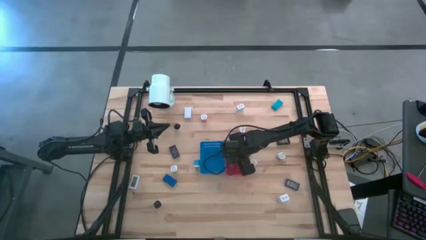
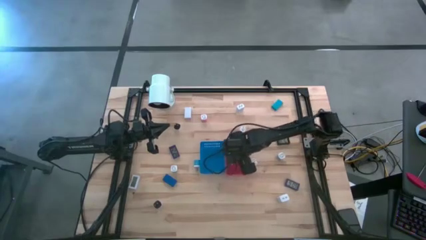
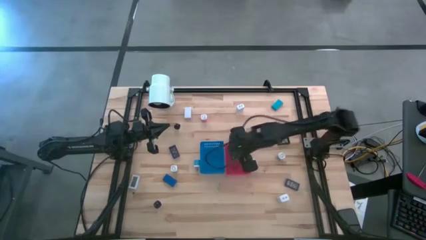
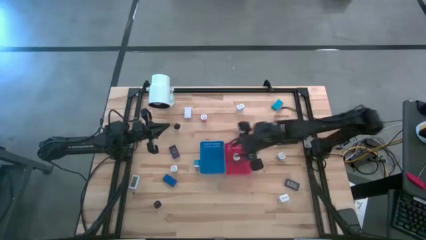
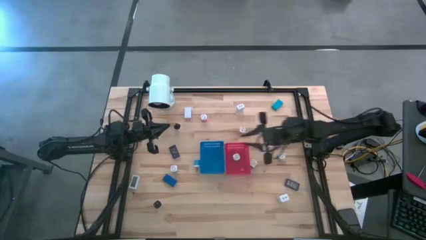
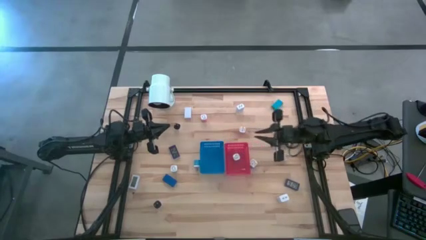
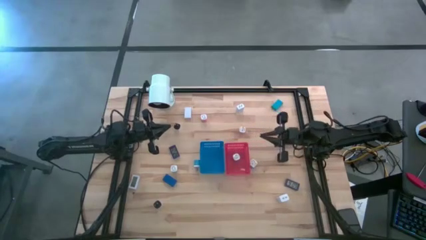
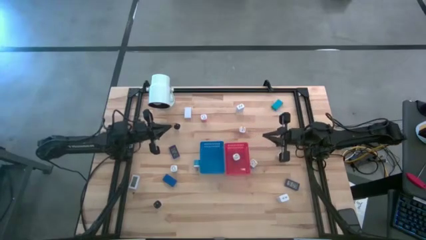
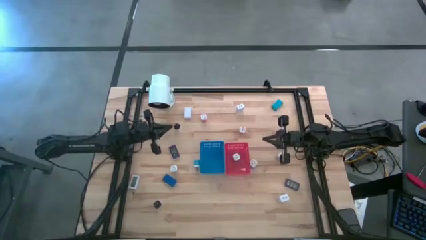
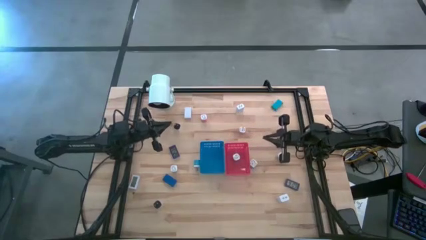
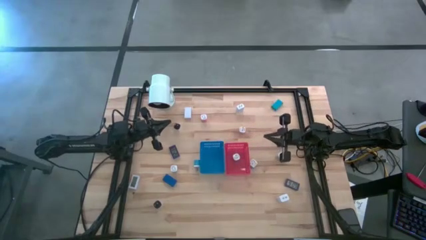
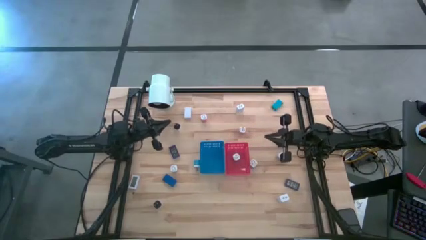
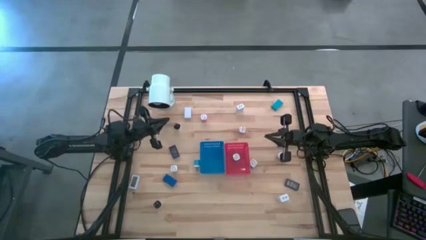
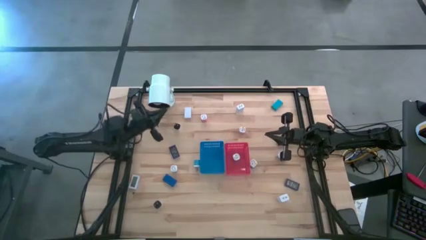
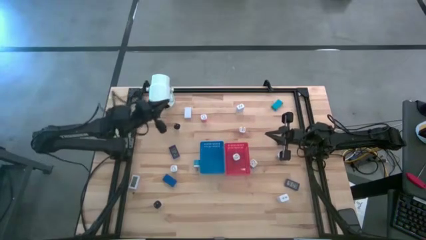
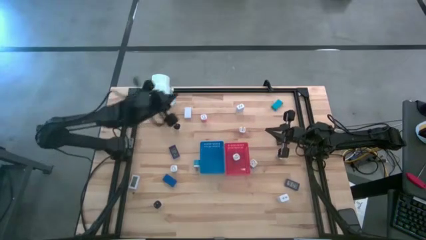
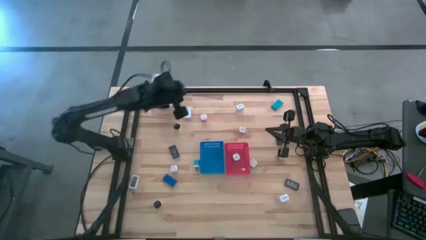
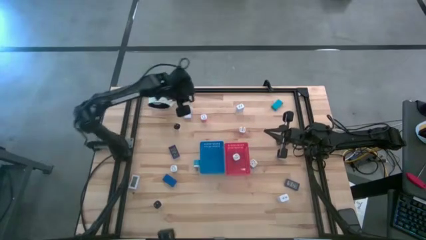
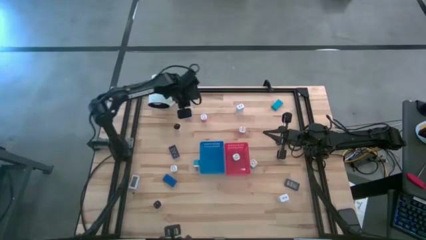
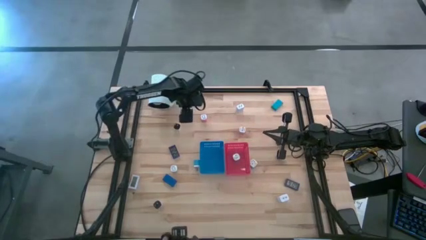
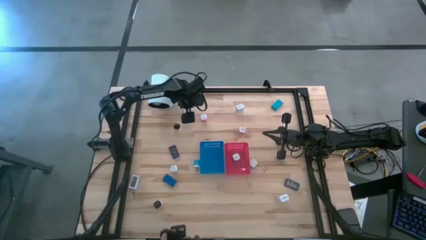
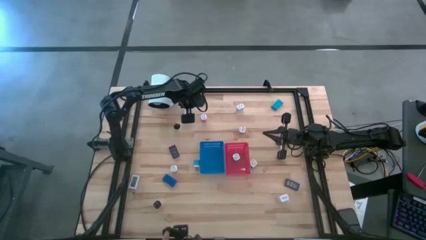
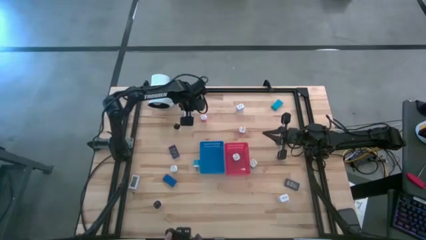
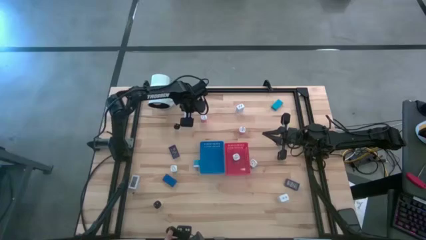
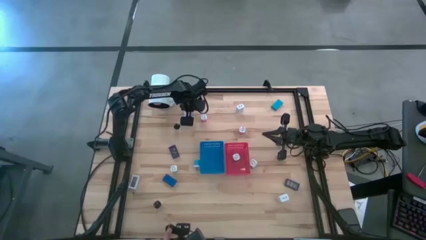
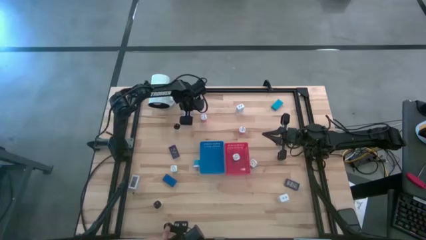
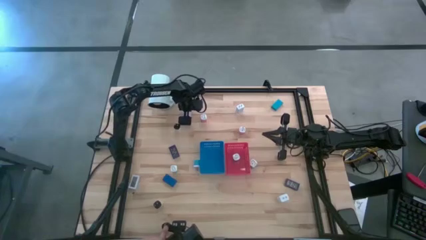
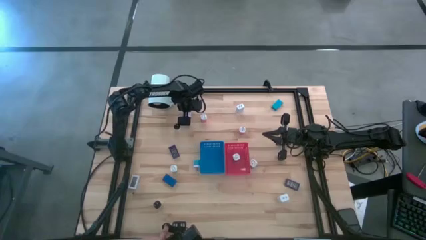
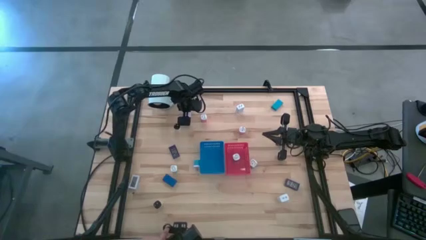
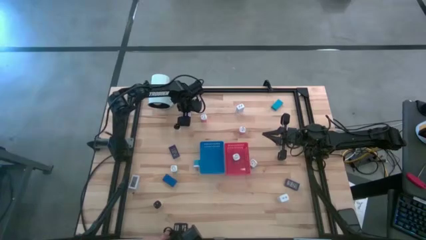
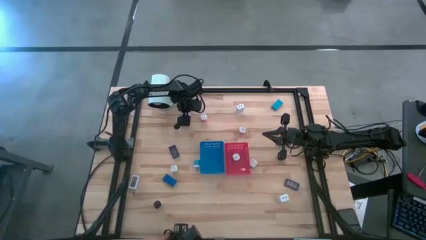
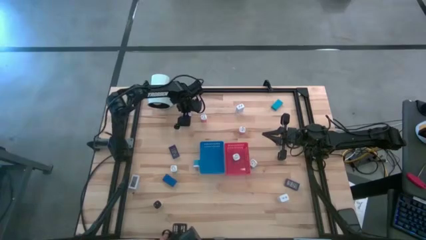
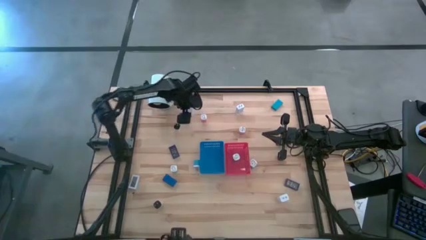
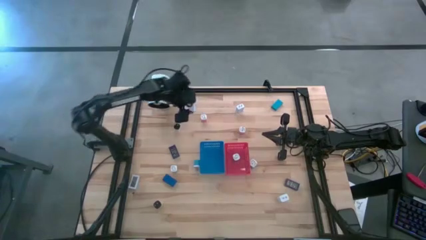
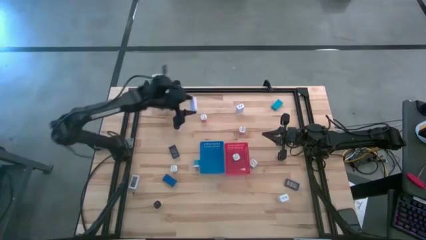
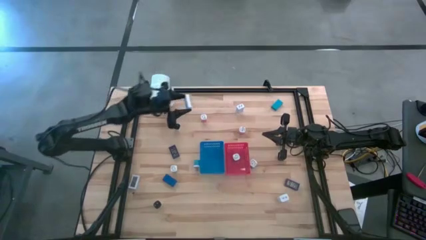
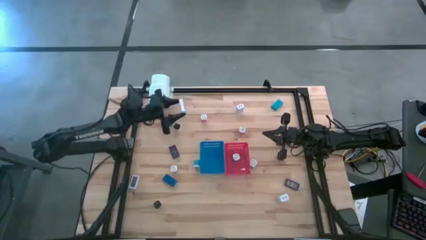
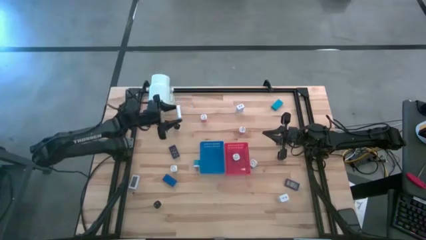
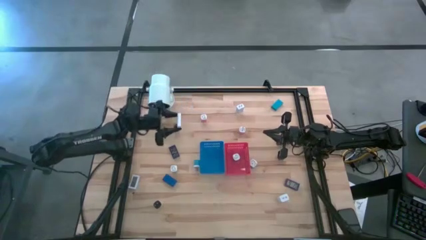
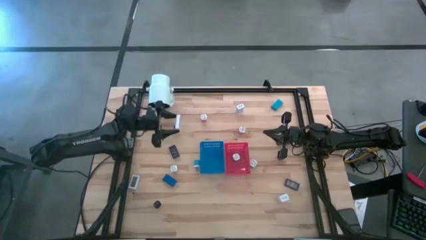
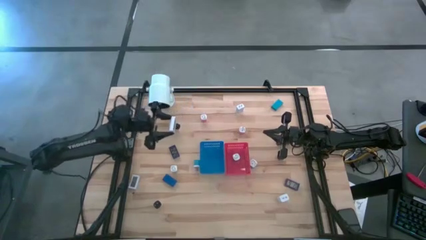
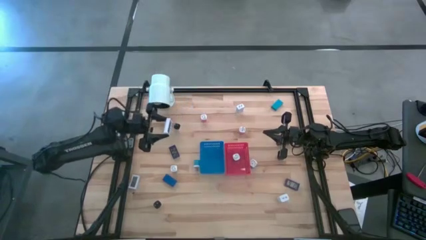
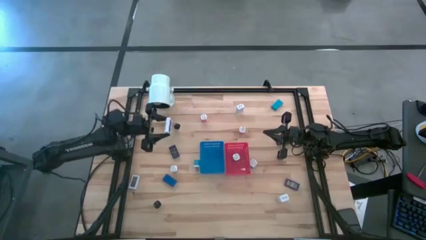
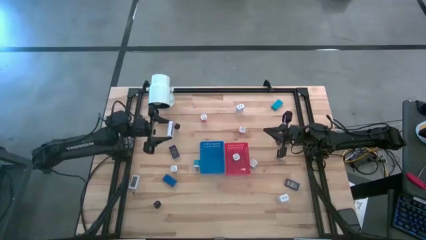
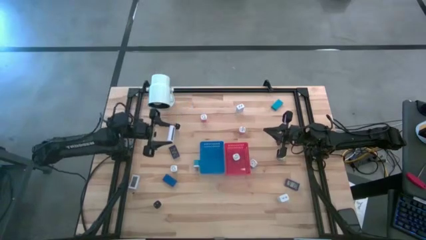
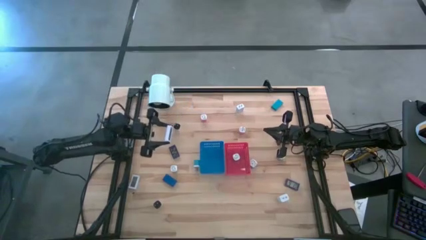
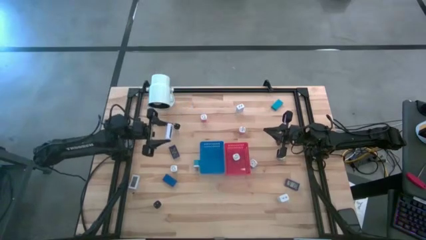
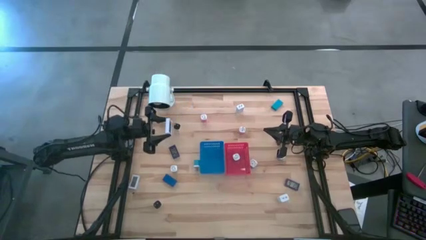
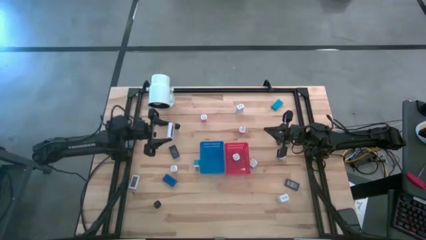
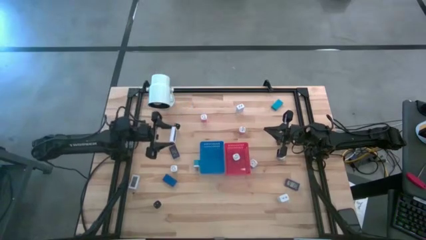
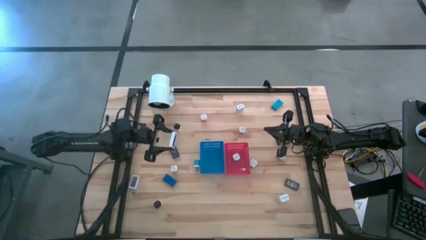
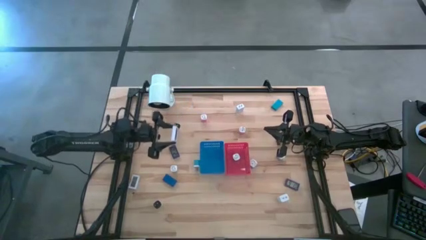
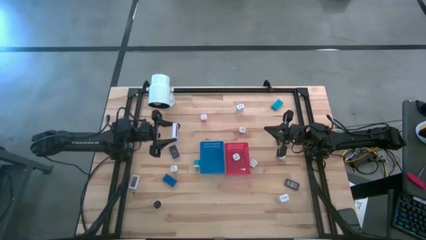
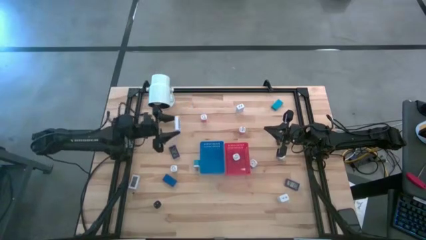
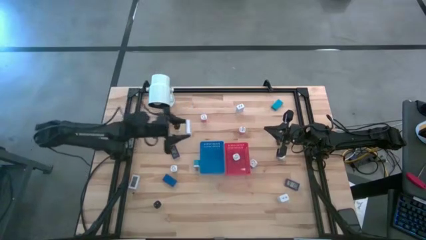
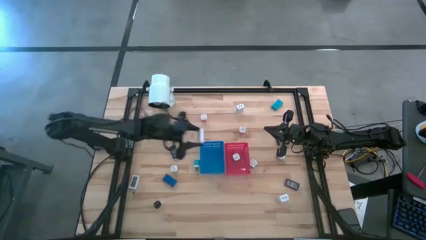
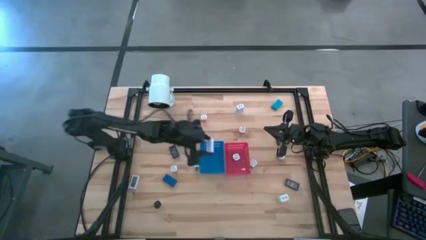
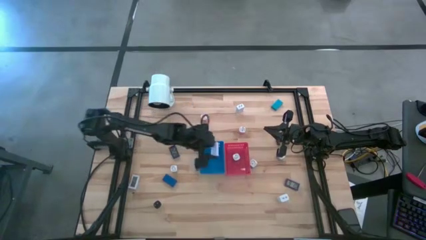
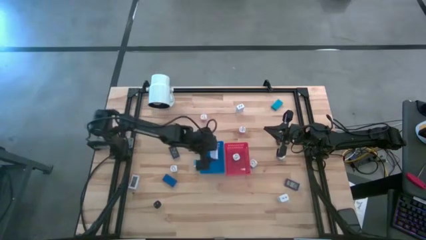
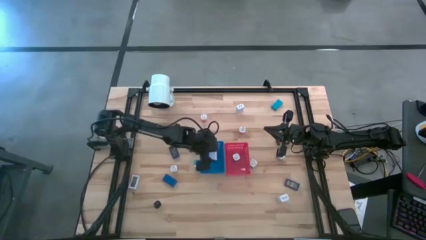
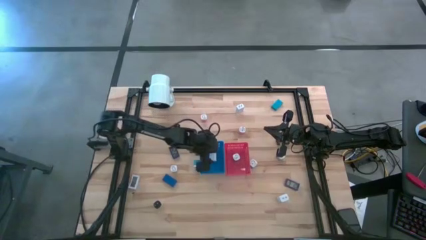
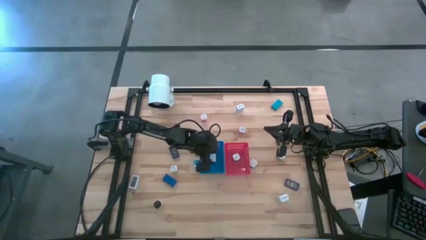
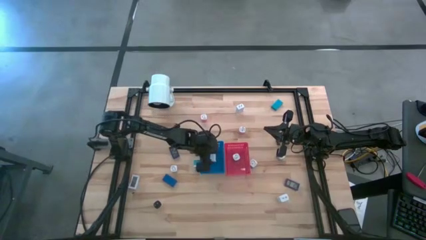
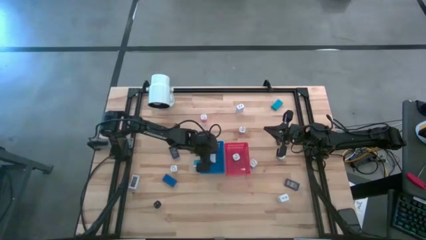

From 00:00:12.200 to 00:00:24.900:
Task: Sort adapters and digital timers
Put the top white timer into the blue bin
